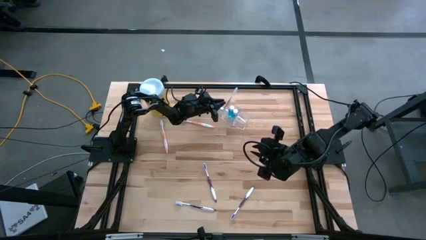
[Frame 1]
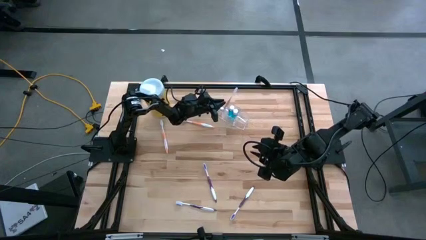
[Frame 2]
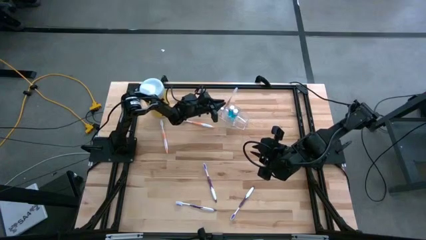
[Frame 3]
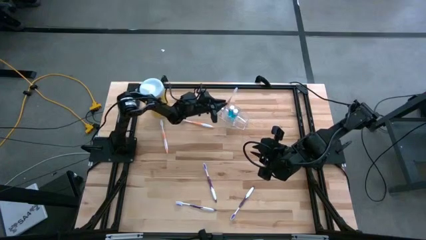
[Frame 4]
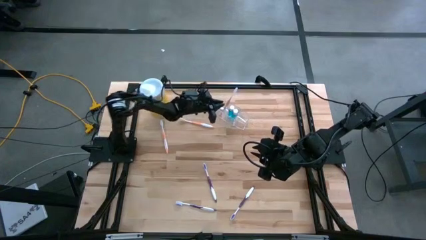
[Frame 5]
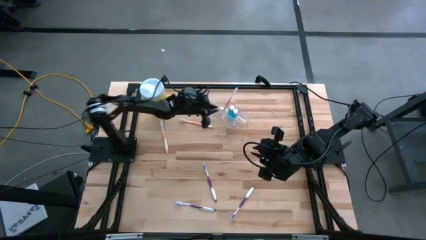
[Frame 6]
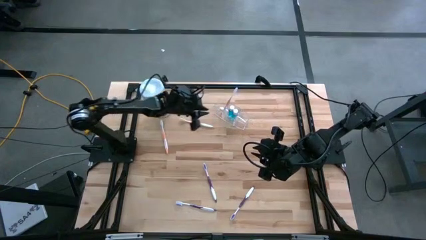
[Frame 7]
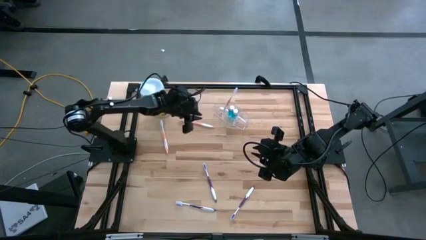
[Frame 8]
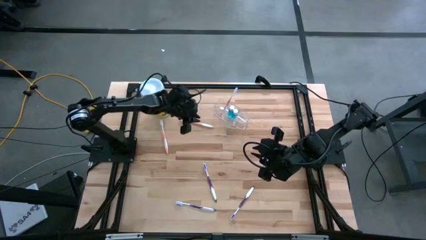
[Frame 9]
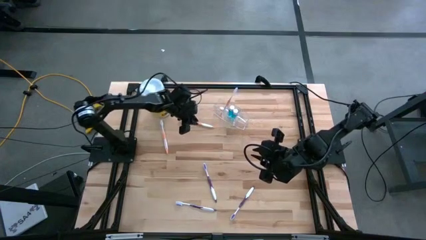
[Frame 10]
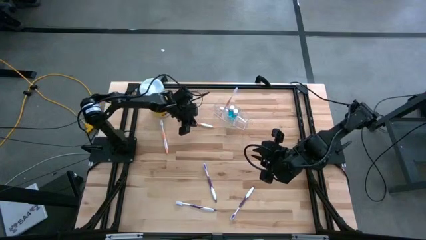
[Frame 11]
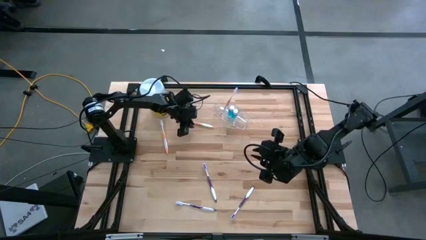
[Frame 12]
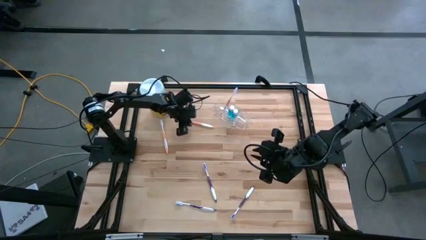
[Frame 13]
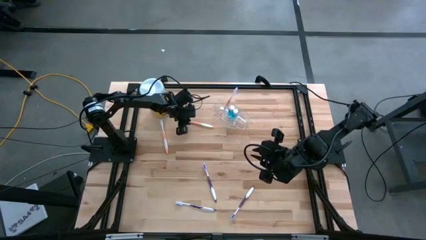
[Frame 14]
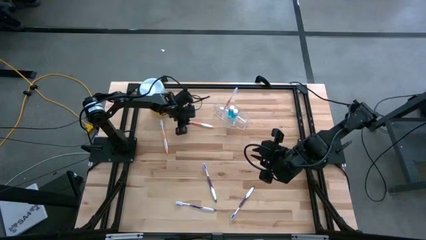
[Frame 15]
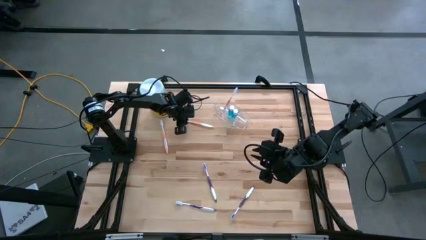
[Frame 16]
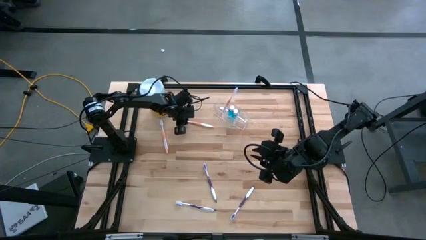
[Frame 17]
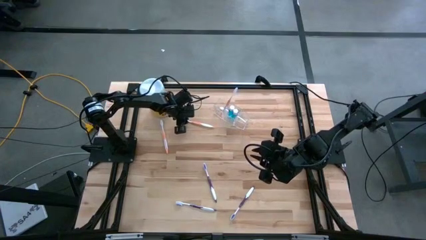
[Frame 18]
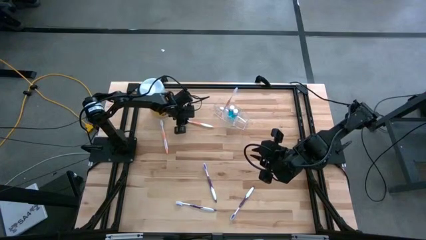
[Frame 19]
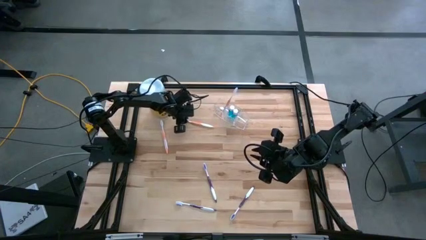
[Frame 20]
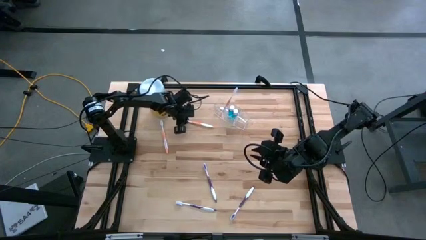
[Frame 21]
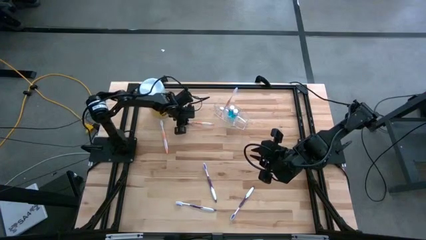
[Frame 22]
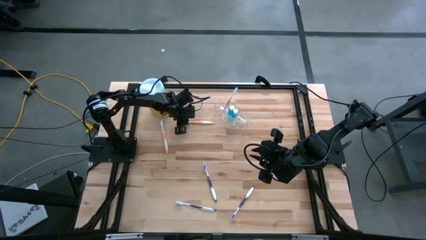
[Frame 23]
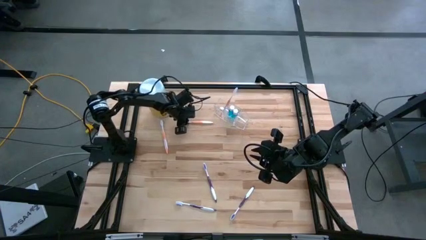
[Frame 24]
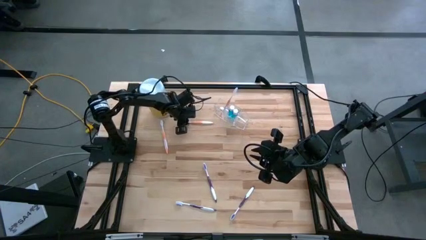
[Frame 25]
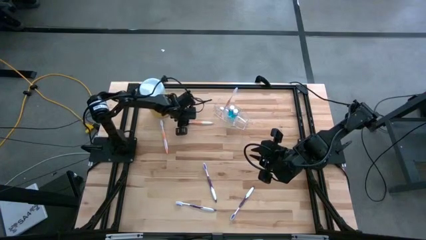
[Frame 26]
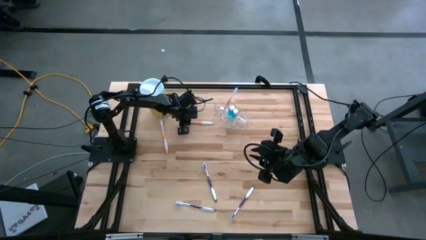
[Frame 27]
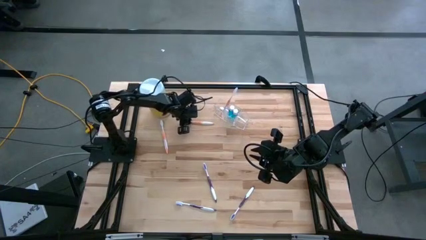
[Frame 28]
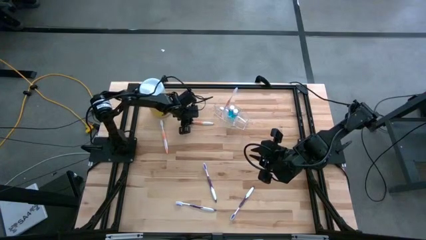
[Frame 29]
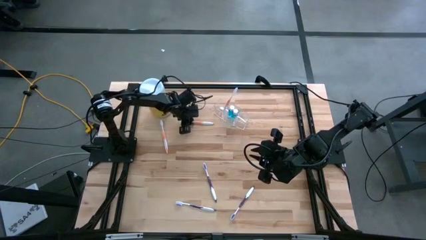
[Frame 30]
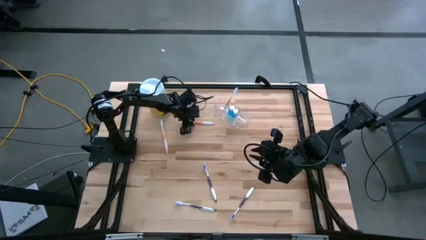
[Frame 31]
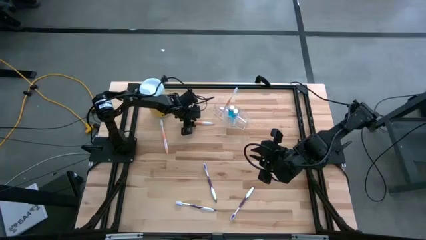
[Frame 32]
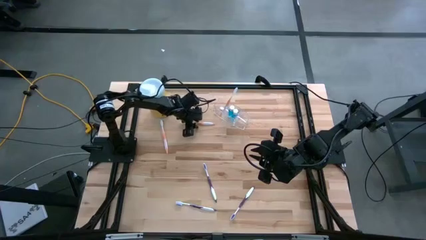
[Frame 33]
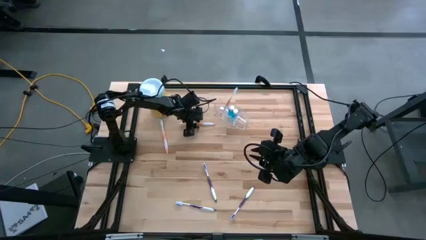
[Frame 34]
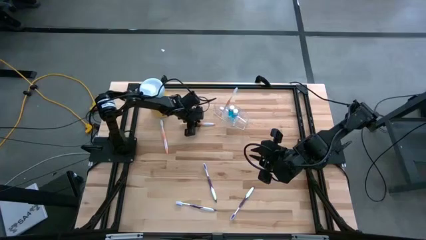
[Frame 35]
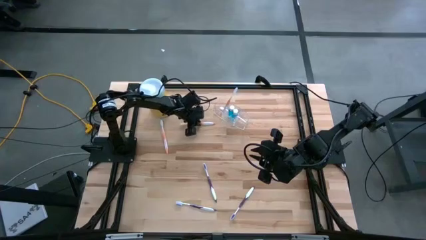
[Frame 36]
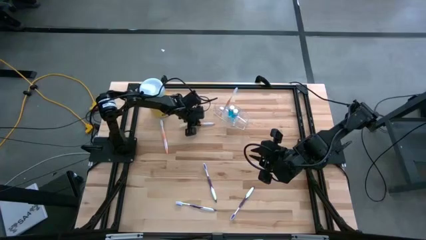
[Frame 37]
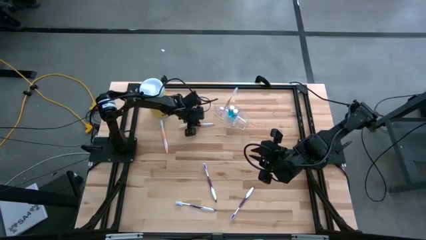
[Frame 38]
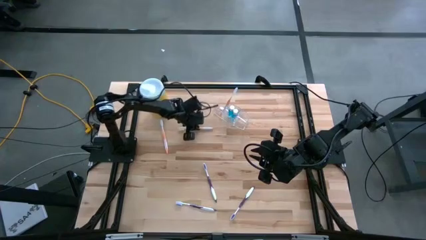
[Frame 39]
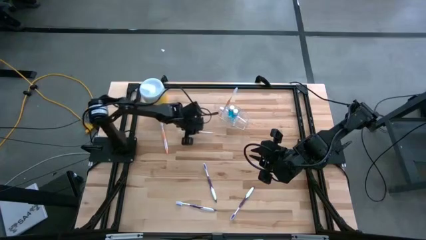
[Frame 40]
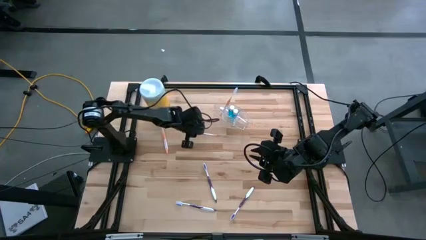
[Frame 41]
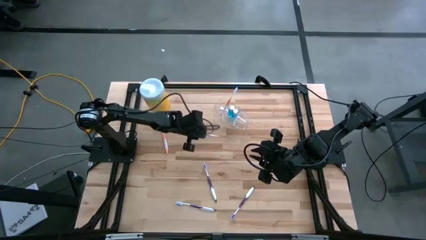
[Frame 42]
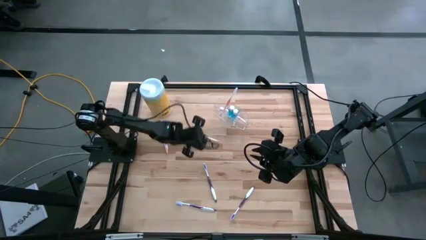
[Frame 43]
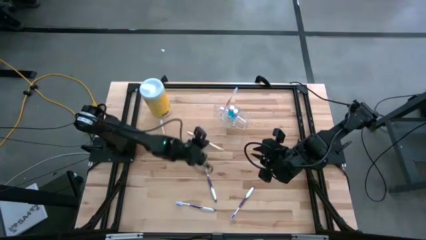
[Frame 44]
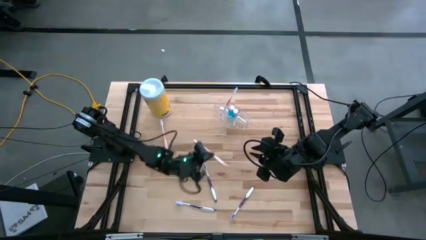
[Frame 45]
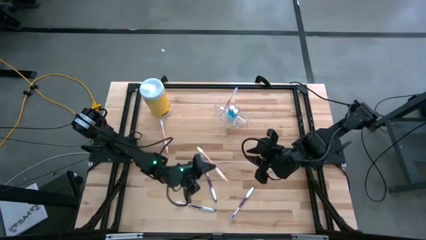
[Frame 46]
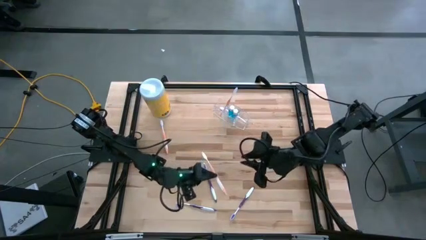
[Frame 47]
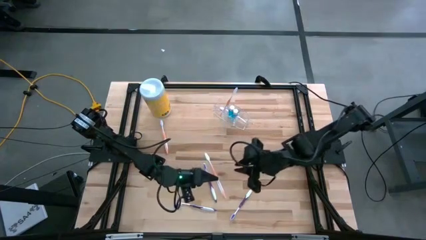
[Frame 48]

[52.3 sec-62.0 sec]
Task: Pick & Place toothbrushing station
Put the tight orange toothbrush into the transparent organizer

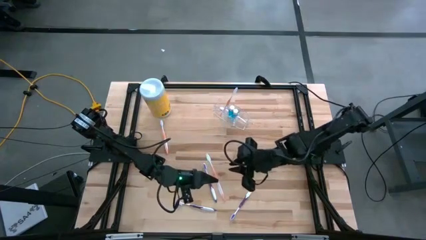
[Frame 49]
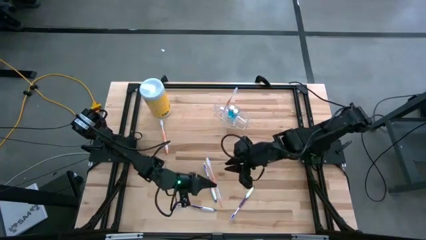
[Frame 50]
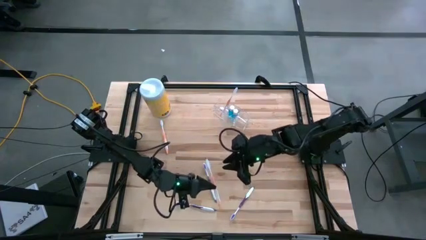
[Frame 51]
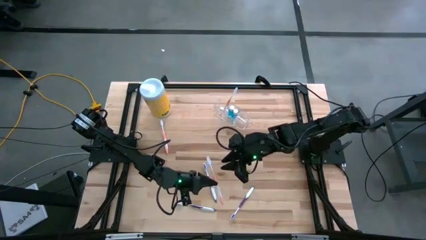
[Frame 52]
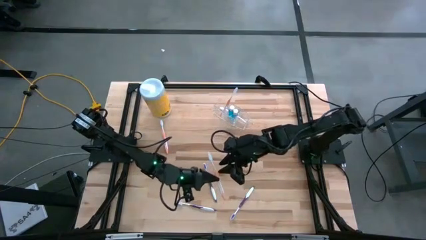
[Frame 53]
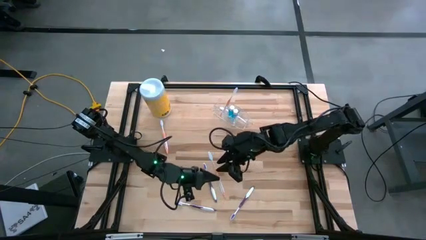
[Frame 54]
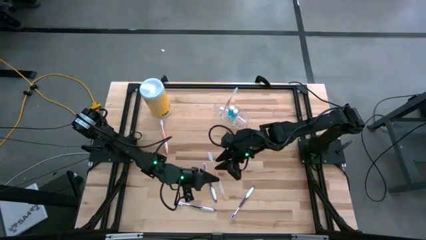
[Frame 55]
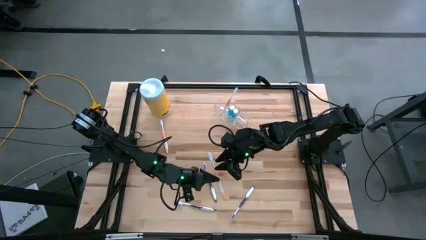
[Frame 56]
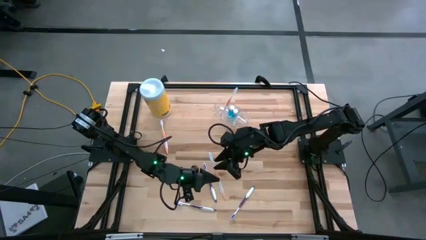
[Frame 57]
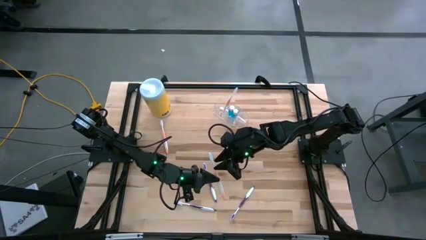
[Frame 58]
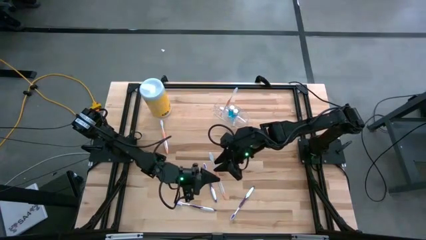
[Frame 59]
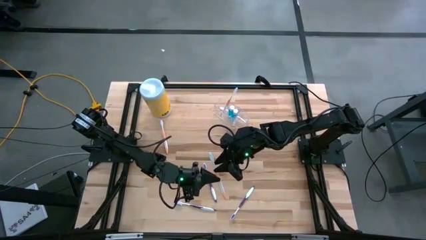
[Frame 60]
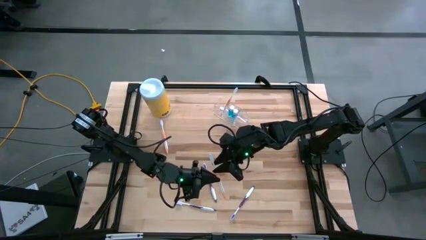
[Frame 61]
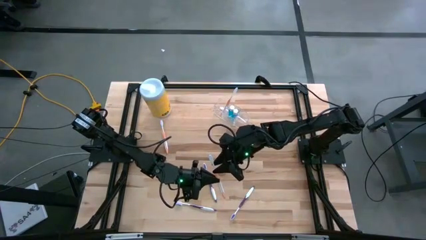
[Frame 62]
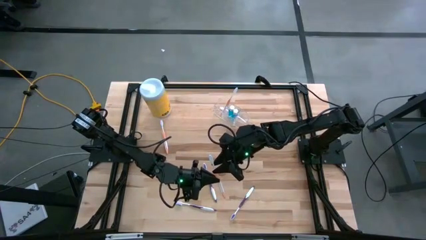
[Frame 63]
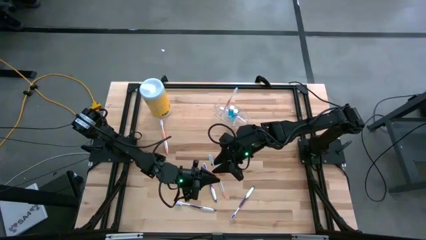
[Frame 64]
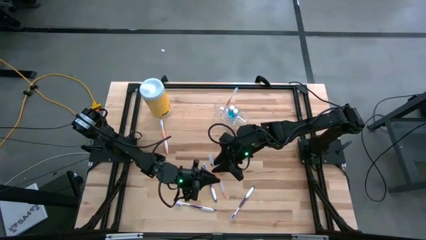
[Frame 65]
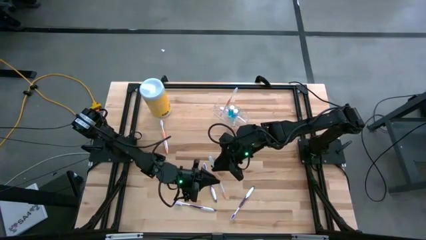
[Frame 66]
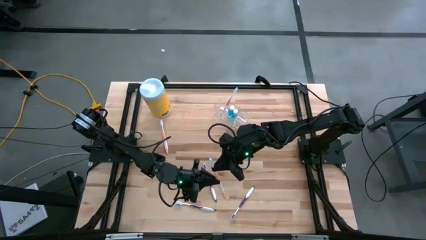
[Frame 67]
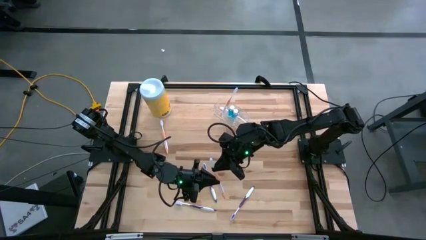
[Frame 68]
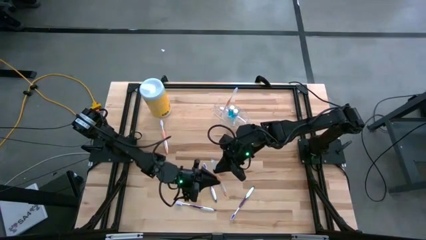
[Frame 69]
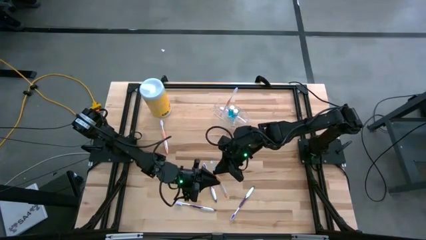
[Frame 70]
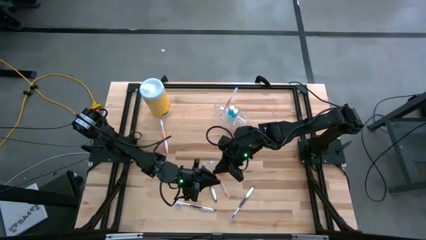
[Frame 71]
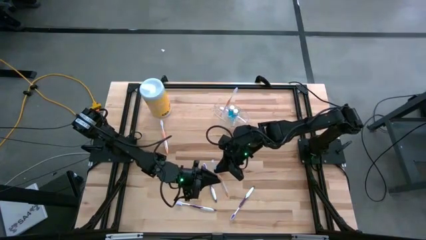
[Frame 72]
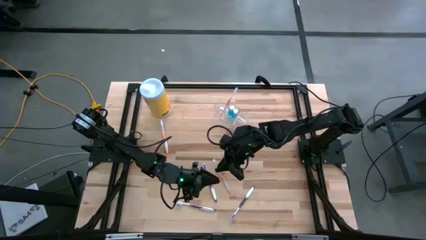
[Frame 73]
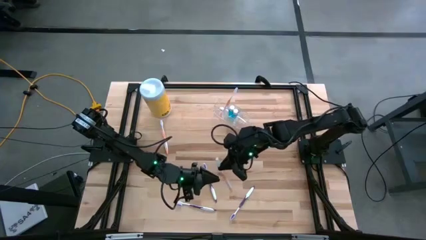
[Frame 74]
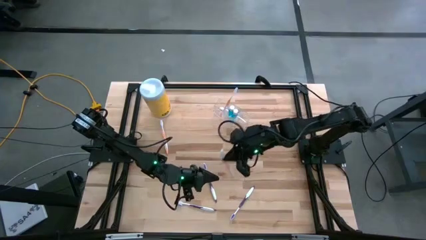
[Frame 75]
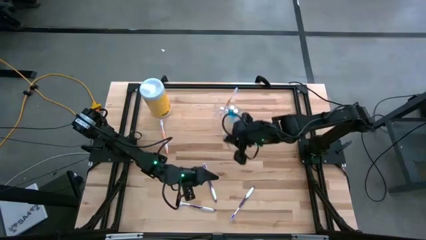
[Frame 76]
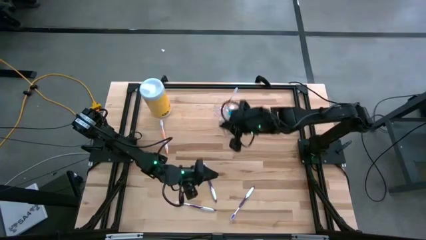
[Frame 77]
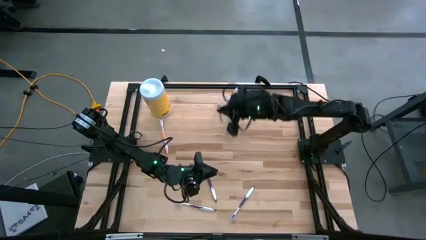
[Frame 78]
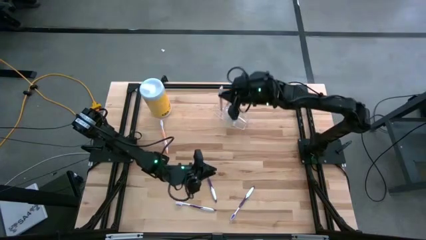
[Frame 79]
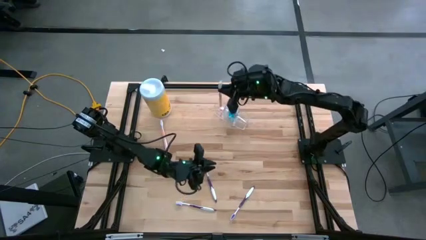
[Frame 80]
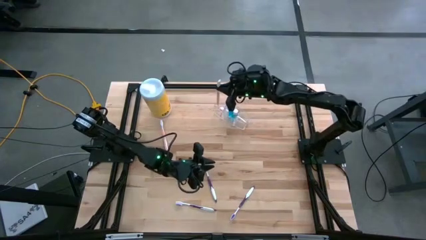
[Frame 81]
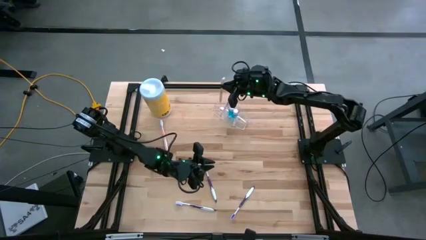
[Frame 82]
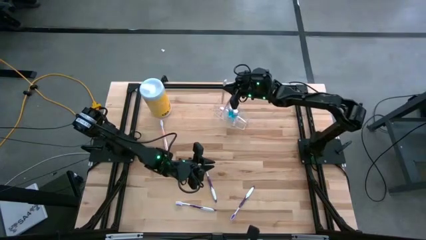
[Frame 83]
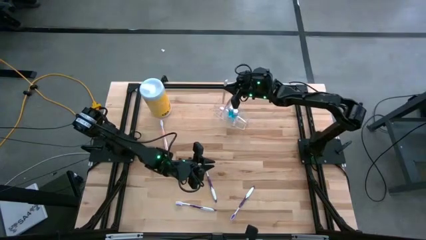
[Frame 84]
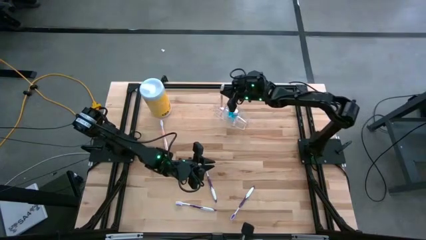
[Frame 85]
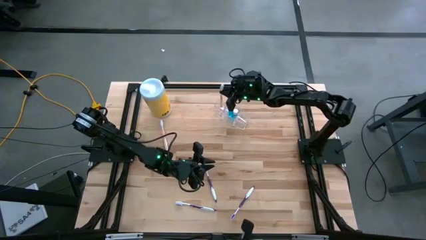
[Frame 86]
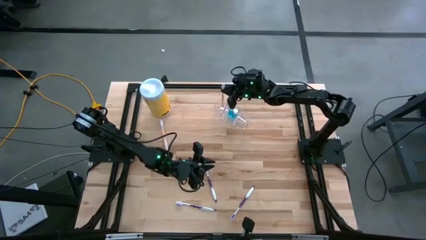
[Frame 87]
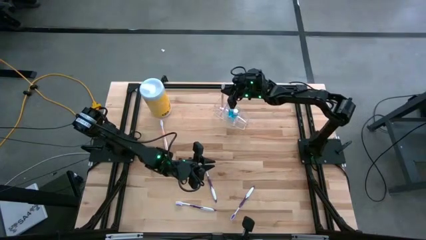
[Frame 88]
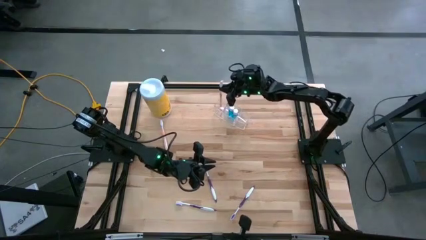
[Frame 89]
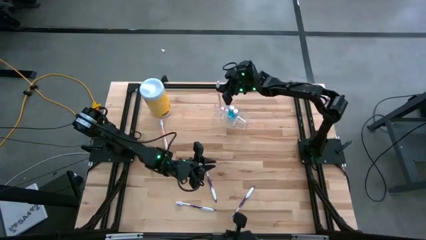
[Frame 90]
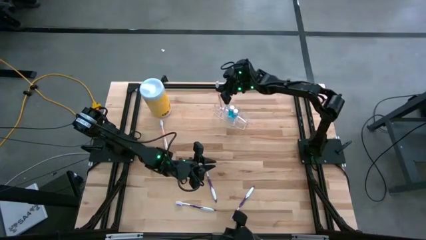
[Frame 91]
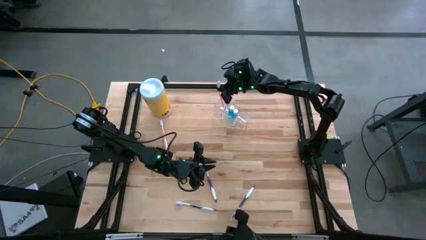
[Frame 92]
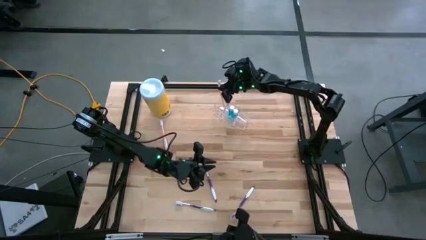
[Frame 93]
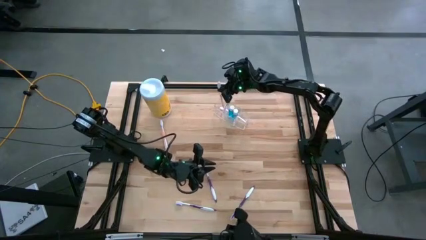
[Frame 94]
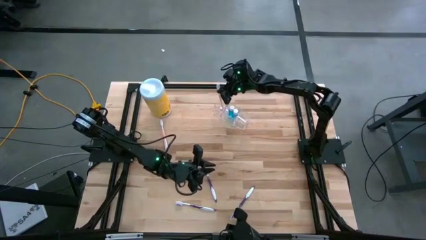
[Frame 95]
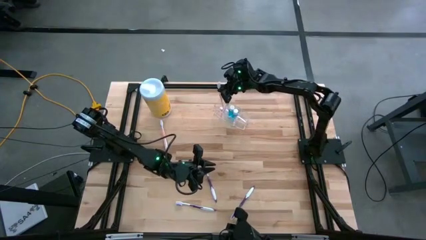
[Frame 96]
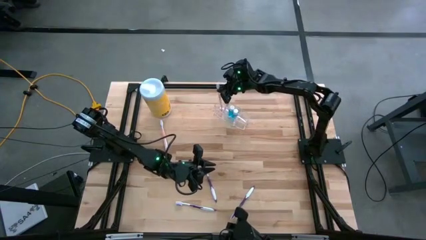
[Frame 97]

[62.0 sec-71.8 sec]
Put the tight orange toothbrush into the transparent organizer
